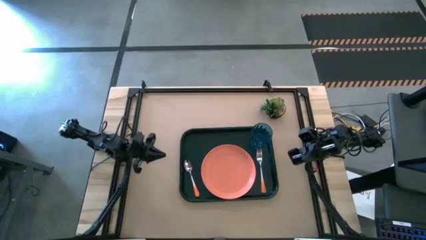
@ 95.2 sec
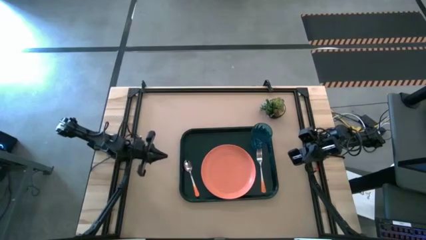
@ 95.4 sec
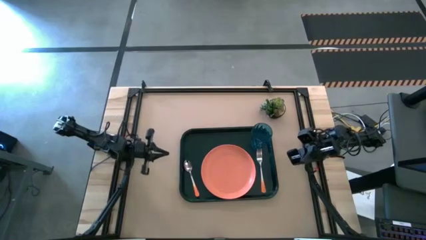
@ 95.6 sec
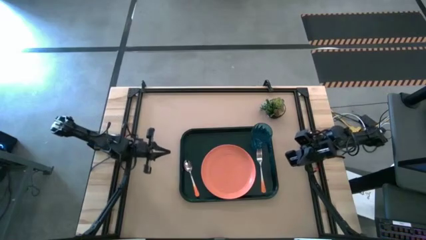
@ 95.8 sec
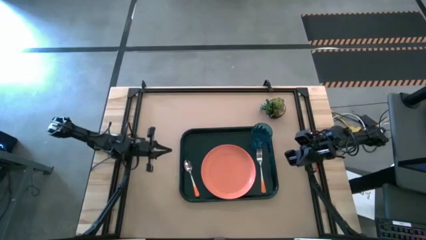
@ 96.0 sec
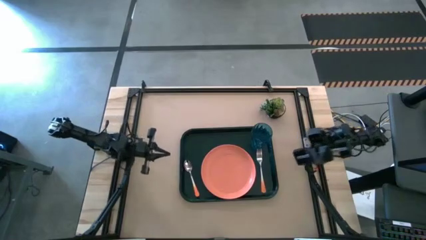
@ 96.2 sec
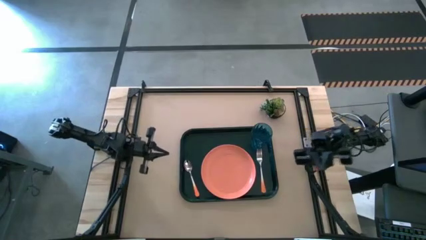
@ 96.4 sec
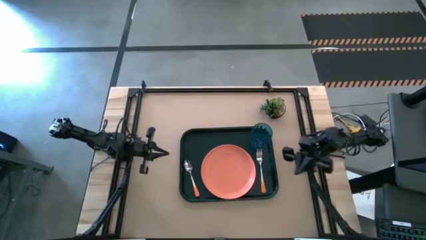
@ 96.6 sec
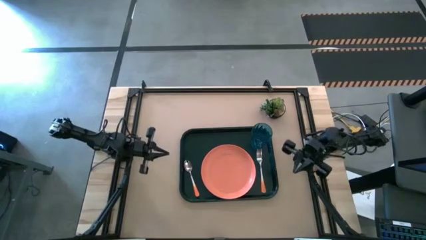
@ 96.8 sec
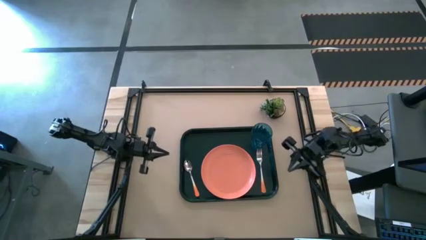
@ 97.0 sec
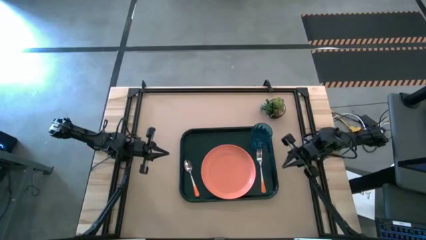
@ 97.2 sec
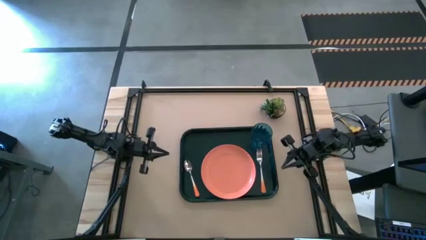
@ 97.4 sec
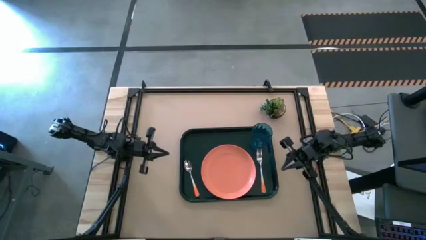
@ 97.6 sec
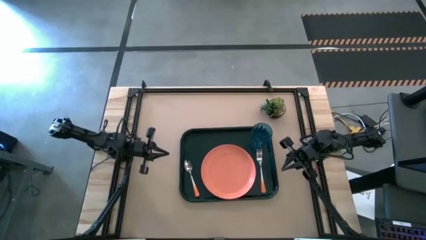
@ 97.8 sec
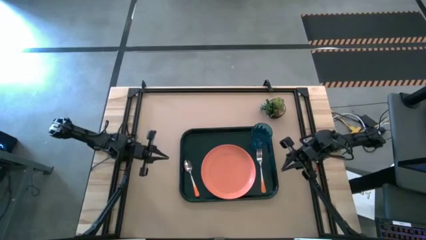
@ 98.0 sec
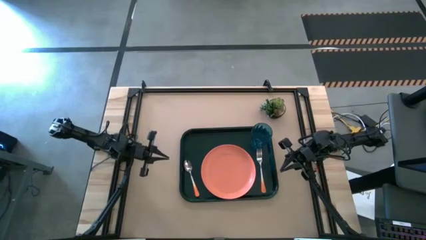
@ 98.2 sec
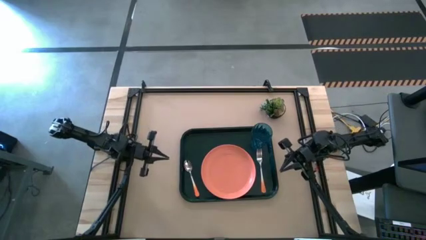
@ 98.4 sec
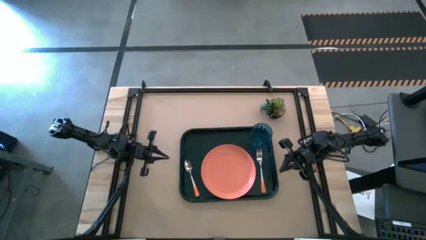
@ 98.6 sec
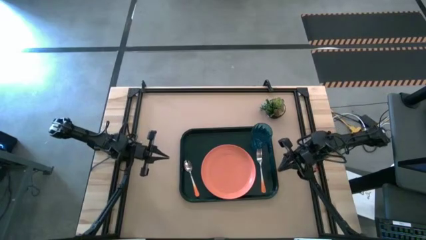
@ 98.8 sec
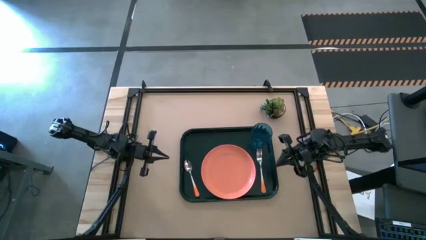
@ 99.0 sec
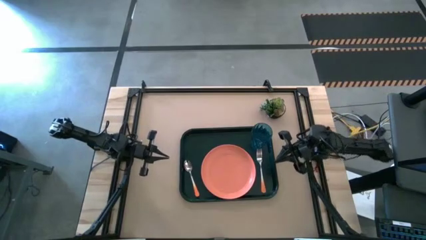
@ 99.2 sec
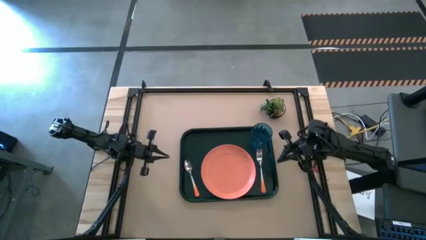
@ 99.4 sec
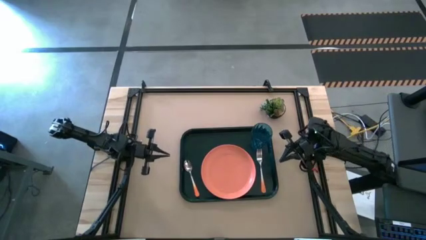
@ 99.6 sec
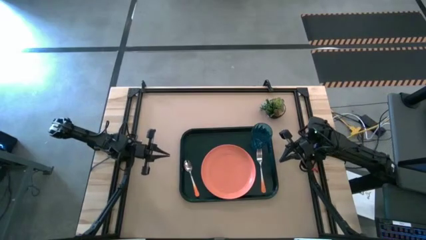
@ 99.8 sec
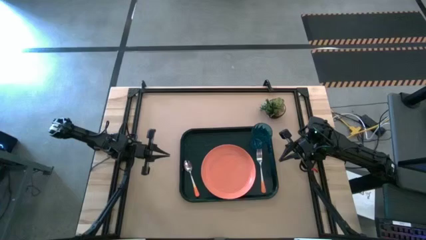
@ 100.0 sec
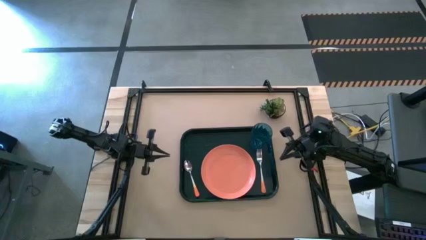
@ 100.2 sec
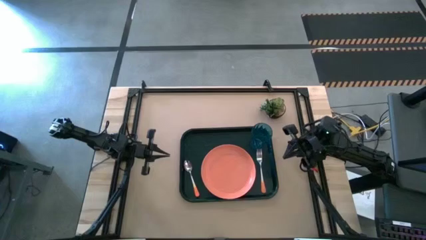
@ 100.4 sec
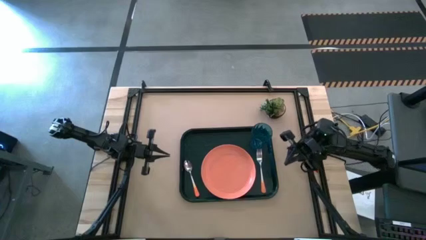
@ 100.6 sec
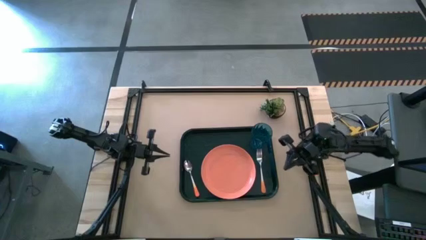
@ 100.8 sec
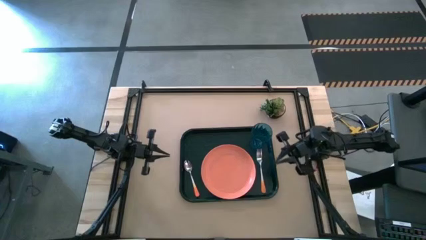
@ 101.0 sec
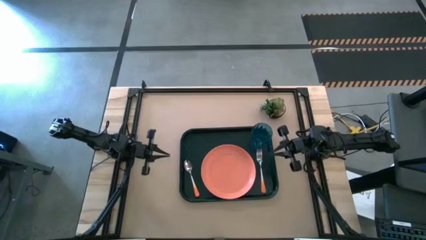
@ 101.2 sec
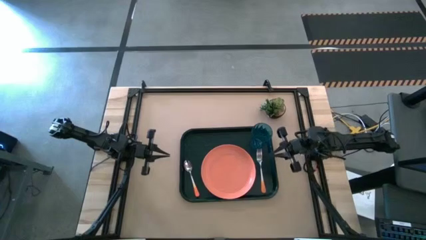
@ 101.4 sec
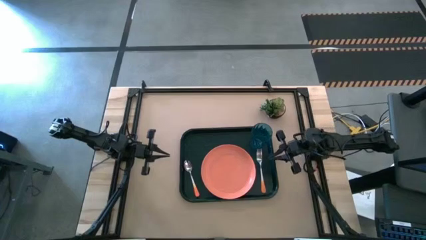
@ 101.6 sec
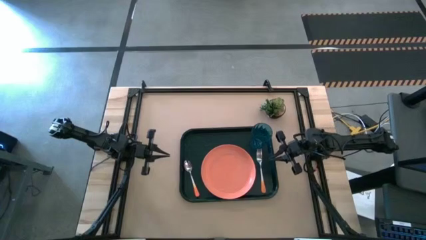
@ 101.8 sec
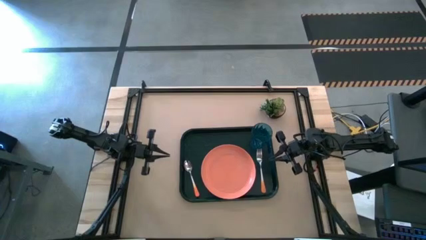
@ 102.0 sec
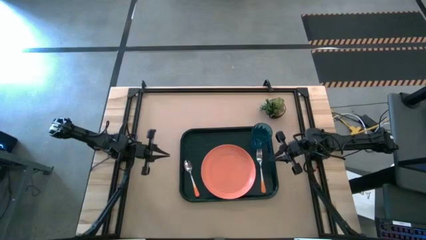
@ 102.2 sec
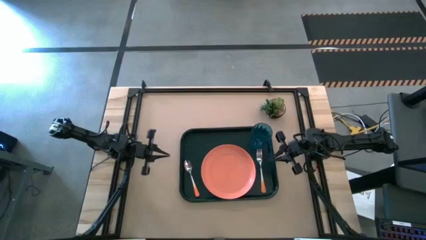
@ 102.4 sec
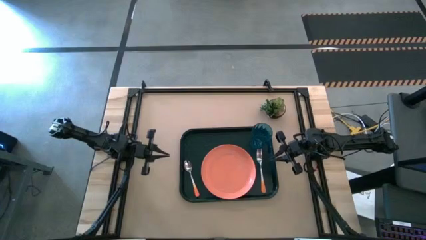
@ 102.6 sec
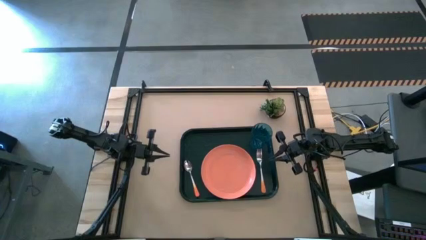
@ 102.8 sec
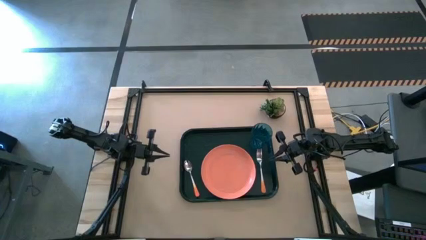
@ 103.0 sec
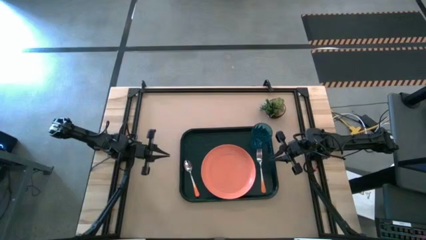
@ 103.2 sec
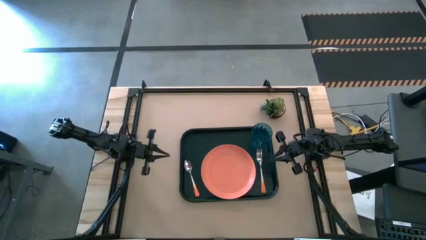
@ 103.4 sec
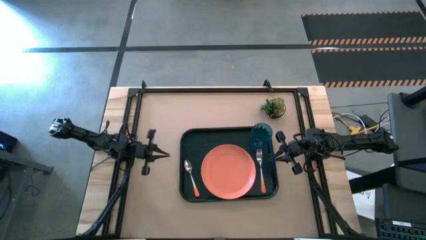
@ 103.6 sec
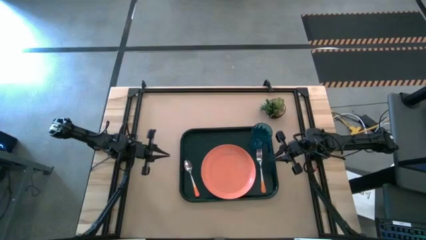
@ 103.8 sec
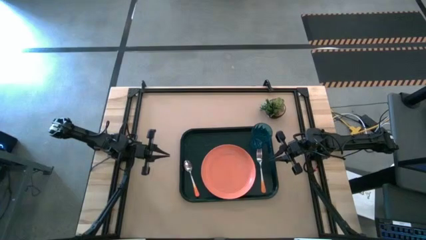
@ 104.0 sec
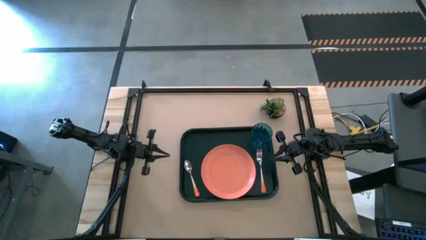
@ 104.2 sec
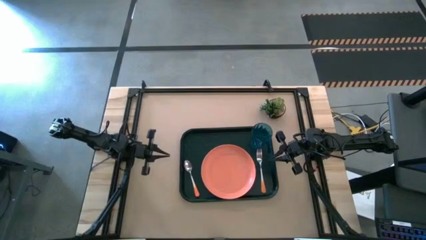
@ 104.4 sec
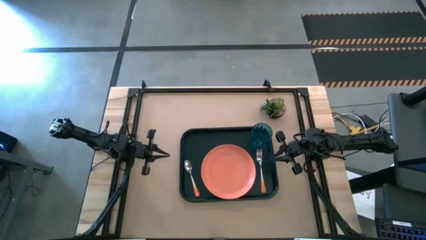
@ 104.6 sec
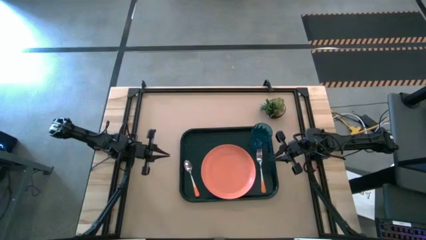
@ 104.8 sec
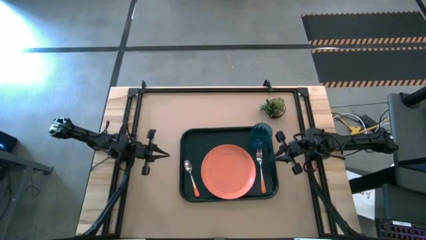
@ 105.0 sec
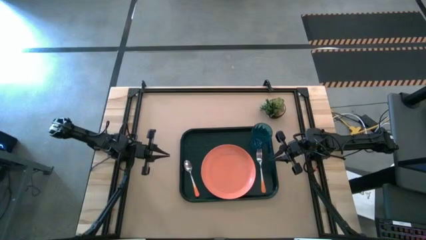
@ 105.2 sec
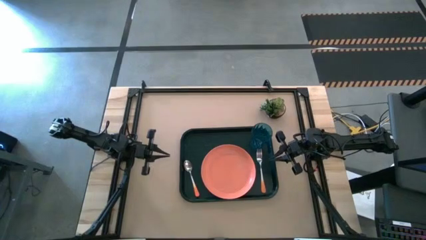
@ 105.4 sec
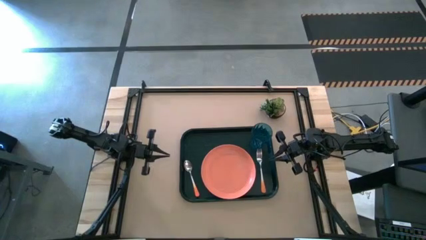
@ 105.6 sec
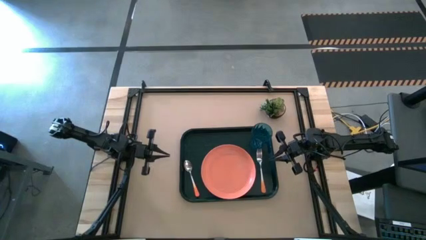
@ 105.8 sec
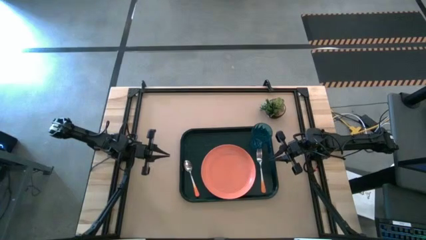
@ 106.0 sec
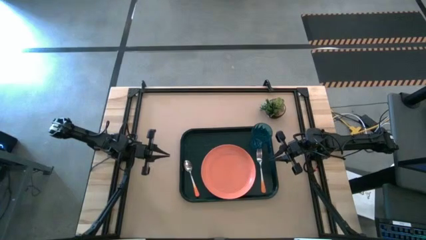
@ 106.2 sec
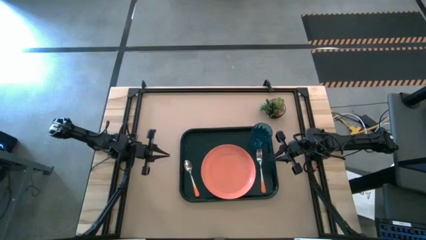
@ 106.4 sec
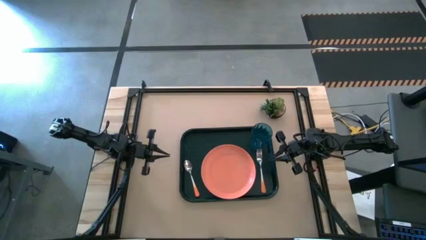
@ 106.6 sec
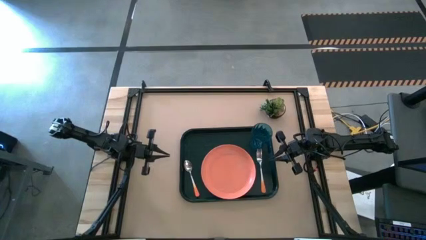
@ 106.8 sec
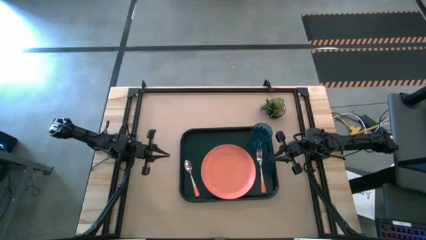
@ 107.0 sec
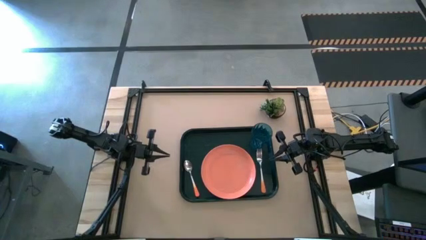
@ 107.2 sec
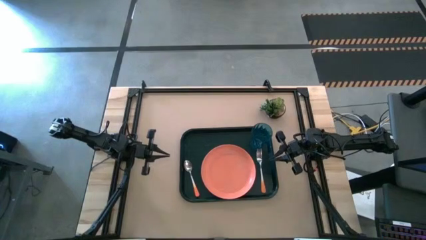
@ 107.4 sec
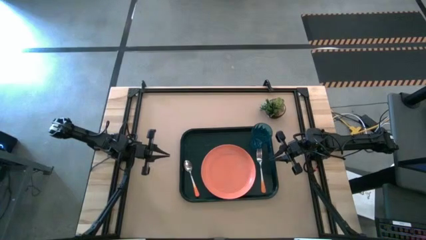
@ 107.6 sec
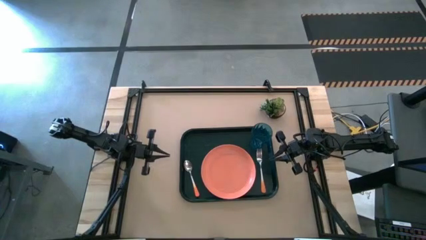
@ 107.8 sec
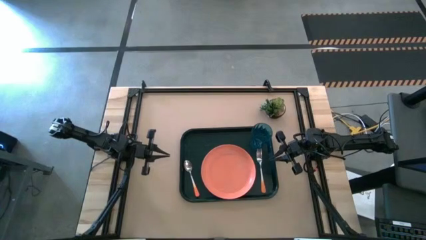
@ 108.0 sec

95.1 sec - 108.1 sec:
Task: Pick and place plate/cup/fork/spoon on tray
Return to Home Position
